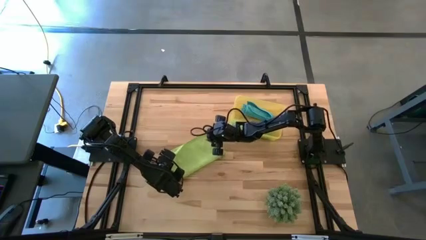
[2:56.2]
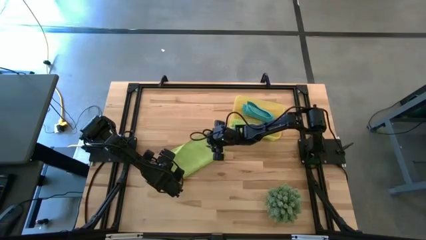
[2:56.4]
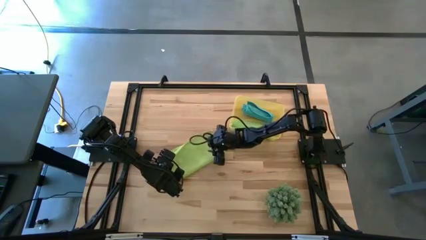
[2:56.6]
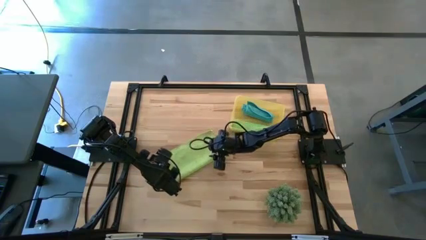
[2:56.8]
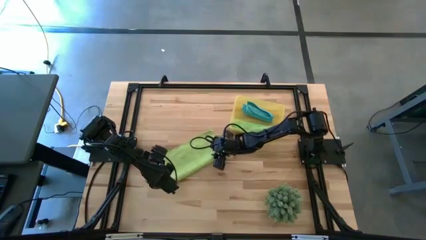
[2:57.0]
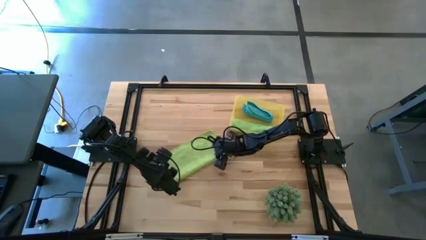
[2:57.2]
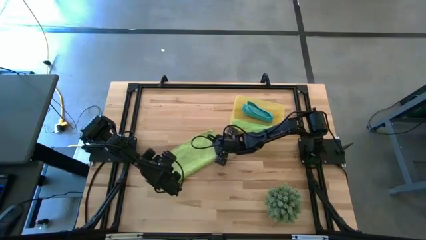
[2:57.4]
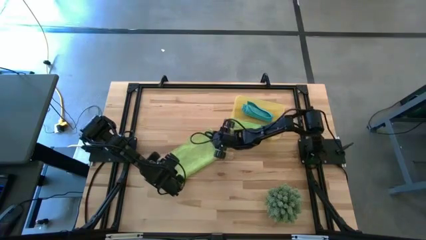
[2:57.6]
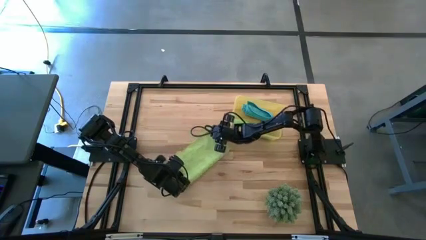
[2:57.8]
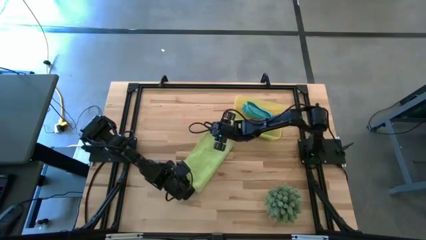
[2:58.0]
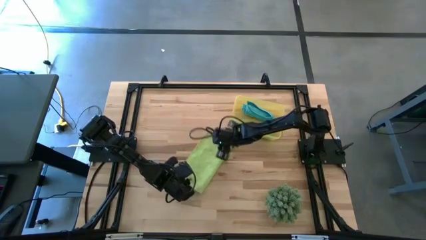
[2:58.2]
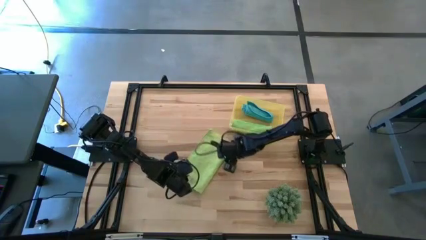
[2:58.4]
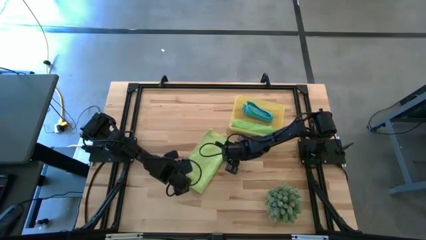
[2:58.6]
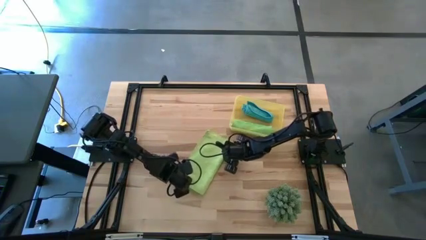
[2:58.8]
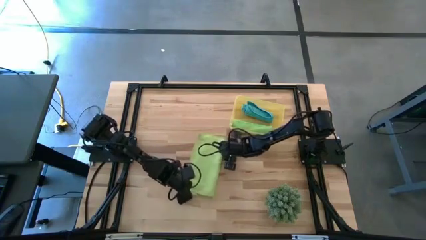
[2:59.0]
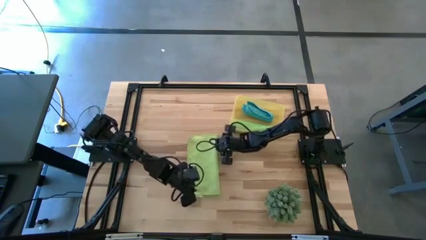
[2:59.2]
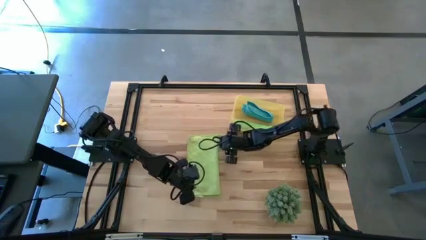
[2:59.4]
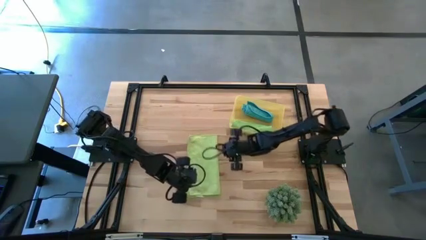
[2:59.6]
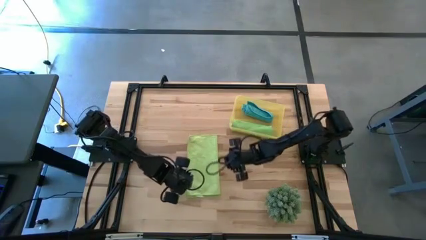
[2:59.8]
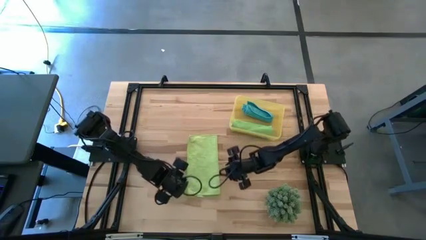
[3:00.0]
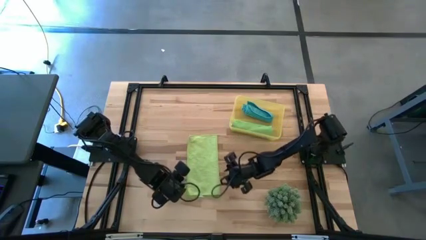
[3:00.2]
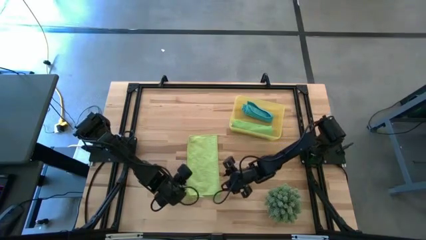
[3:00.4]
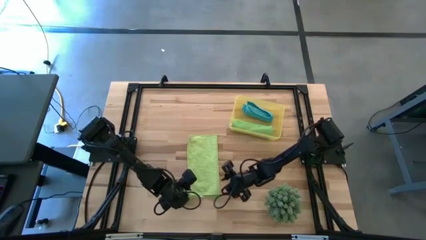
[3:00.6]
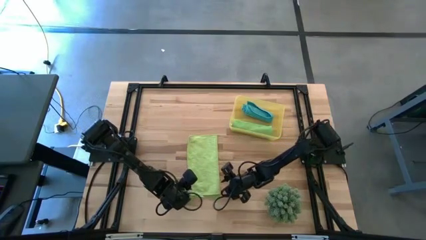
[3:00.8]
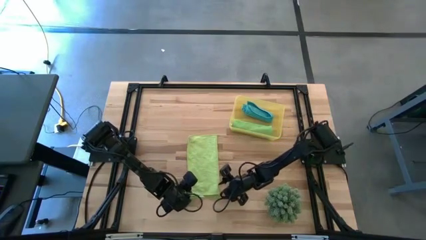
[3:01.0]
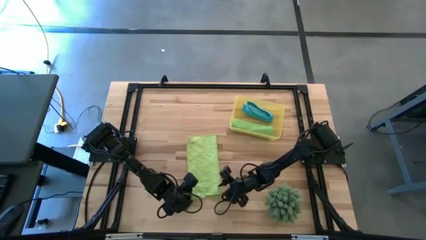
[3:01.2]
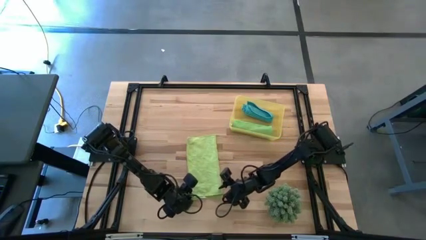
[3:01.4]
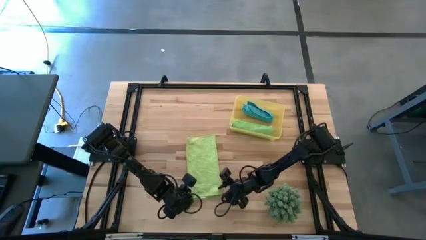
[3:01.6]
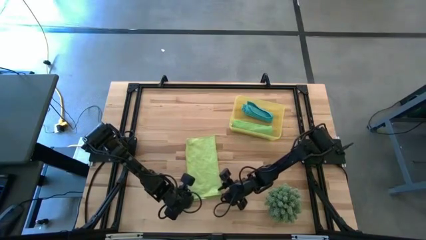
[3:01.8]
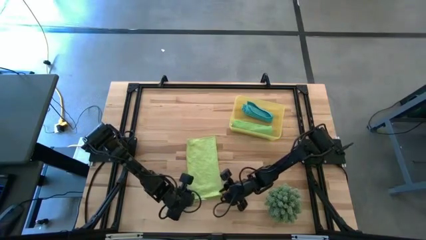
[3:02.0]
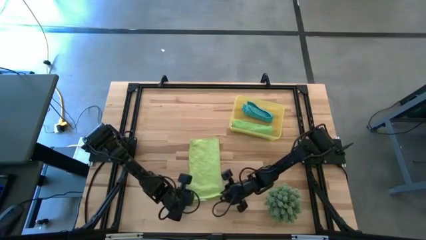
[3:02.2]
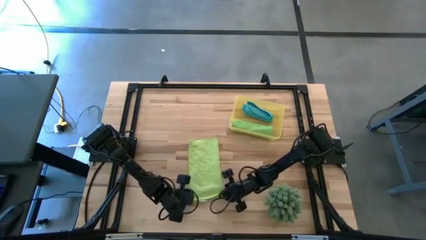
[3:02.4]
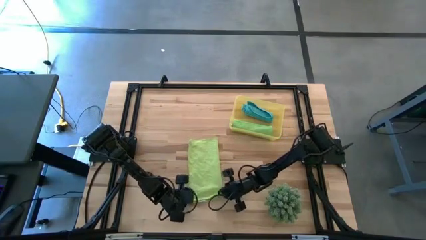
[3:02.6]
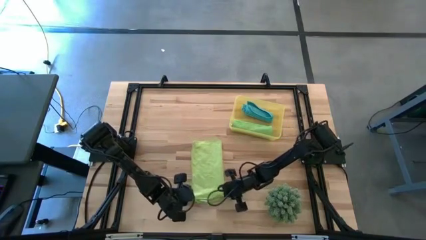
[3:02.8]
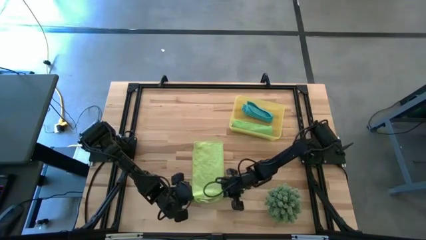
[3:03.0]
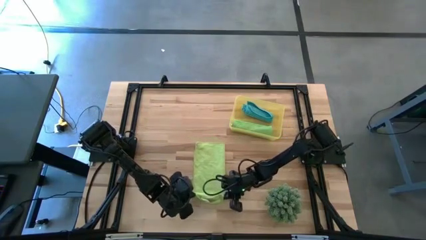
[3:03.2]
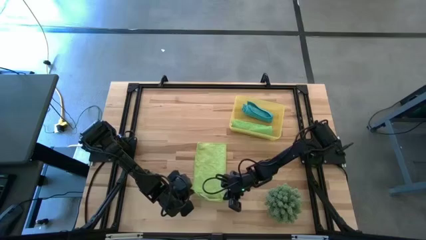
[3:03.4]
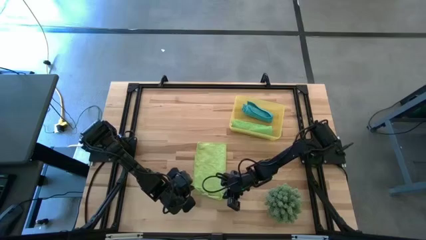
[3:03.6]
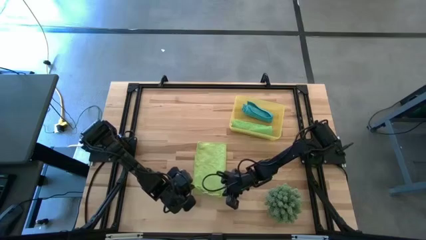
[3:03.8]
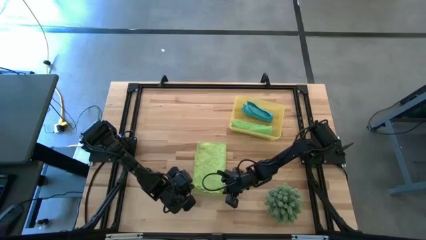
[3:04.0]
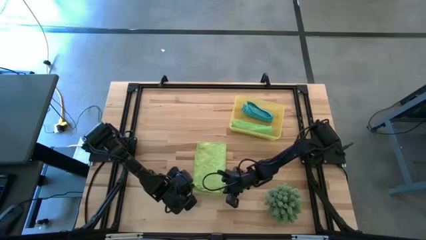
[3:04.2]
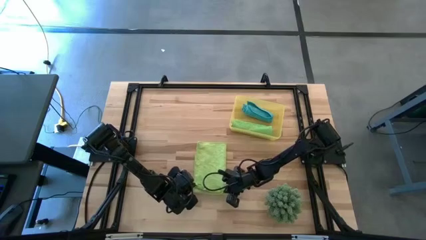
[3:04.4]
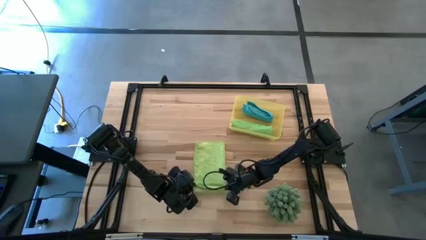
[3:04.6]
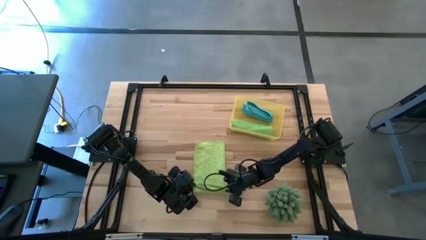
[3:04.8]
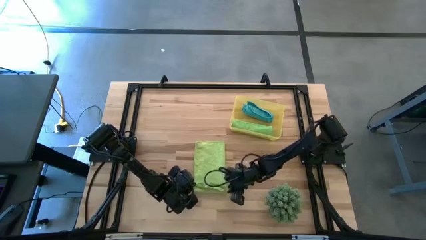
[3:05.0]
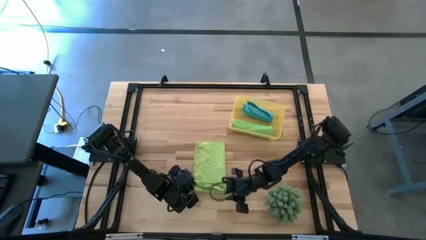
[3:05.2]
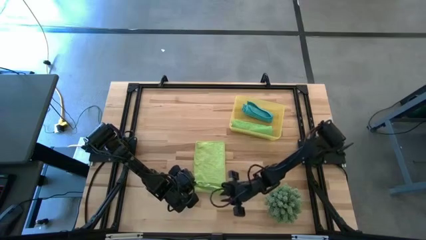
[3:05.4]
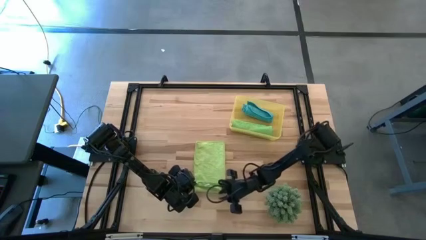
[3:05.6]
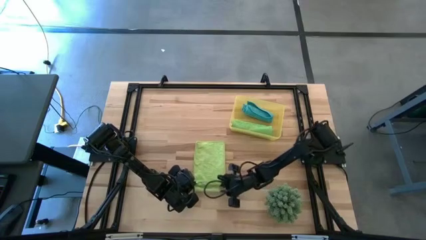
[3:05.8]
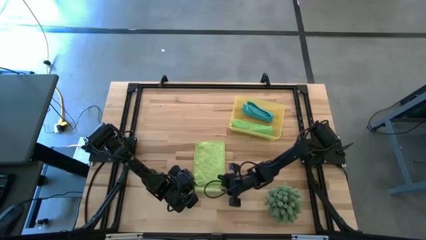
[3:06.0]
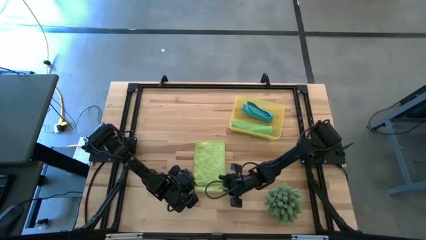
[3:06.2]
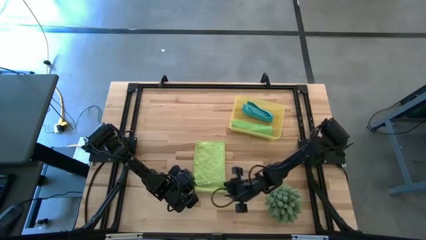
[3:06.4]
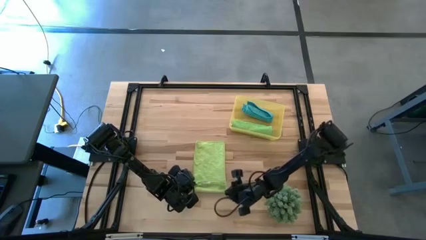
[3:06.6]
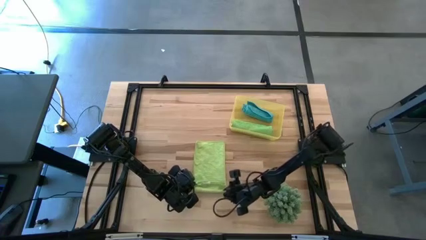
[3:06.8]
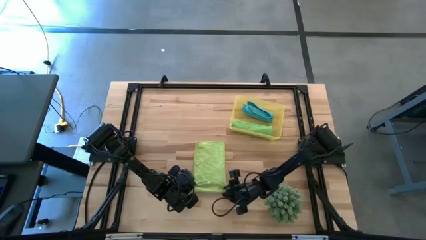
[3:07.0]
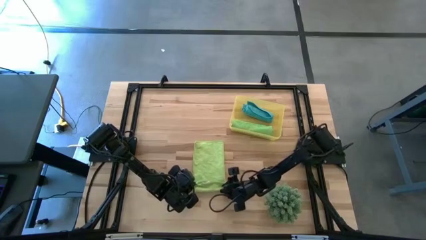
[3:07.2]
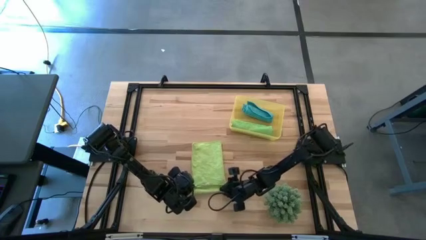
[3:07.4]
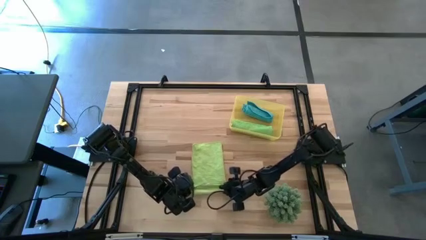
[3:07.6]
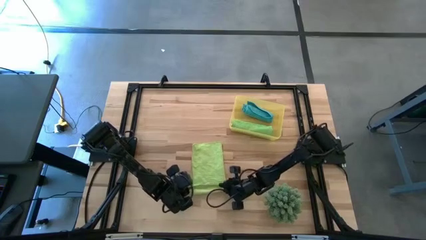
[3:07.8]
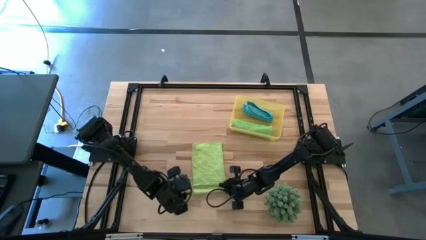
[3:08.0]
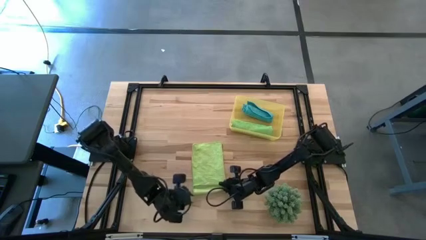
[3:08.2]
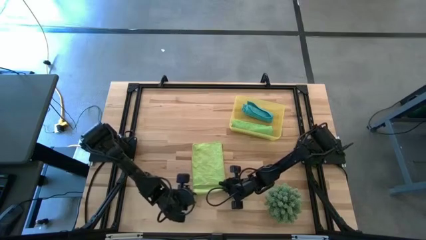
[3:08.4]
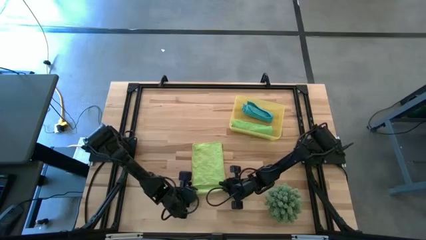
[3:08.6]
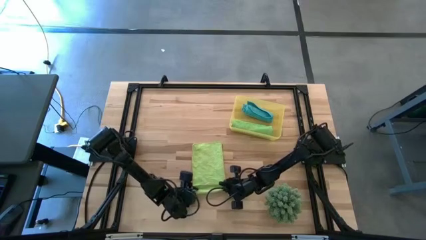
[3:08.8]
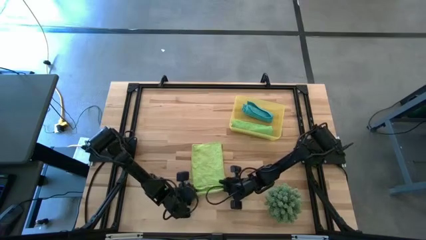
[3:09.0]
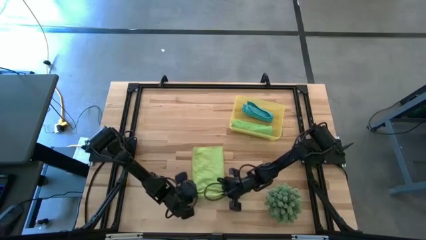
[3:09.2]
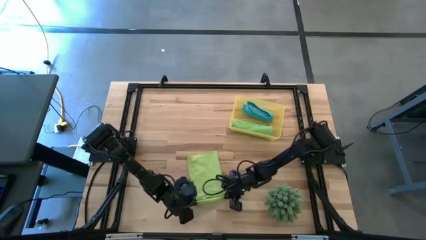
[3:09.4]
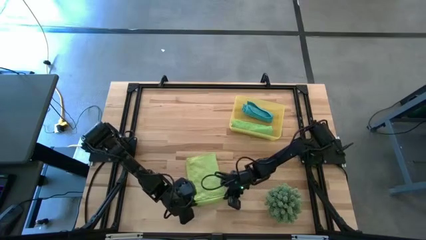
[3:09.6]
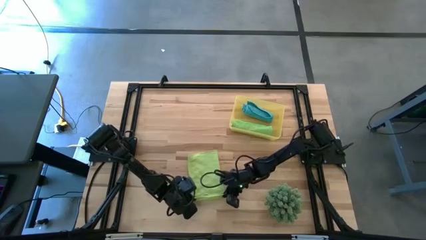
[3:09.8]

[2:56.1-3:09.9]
Task: Roll microfiber towels into tight, uniform cylinder then place into a basket
Roll the green microfiber towel

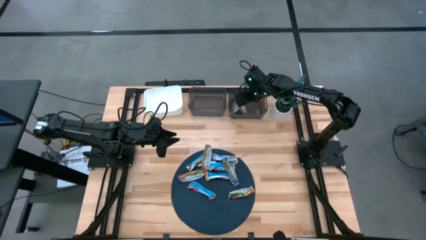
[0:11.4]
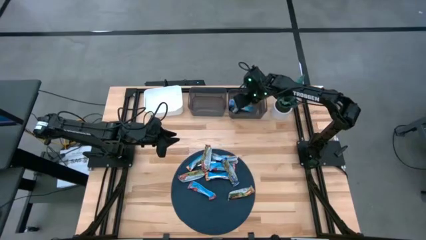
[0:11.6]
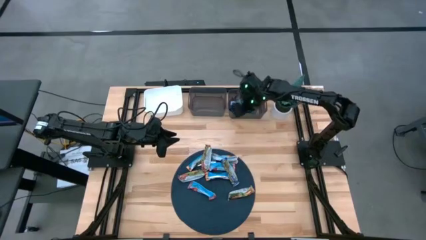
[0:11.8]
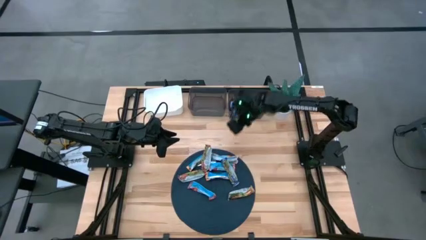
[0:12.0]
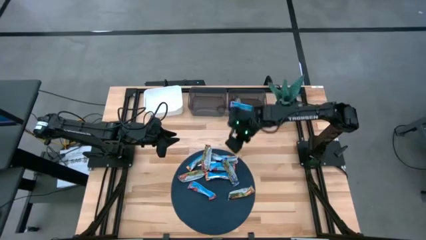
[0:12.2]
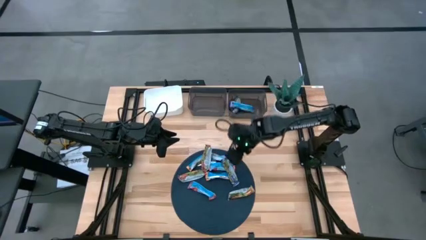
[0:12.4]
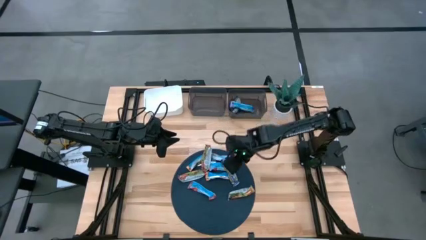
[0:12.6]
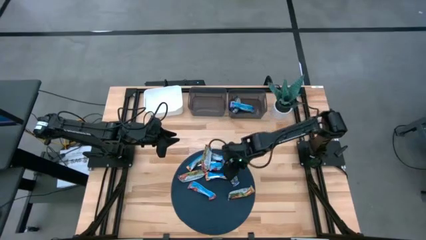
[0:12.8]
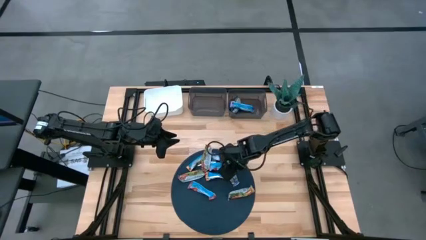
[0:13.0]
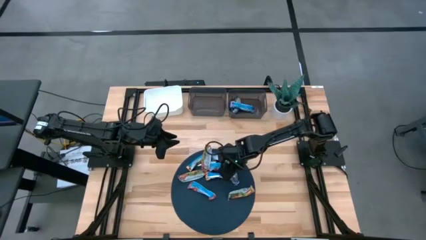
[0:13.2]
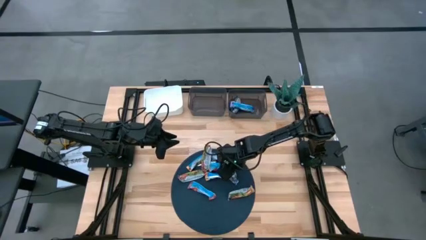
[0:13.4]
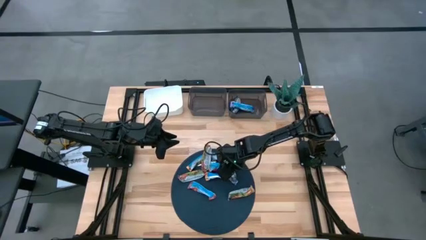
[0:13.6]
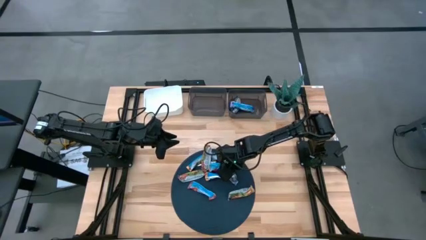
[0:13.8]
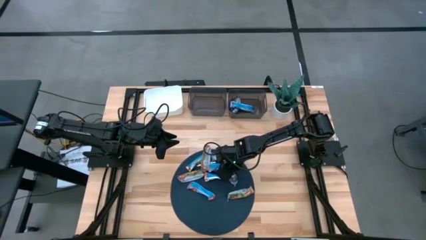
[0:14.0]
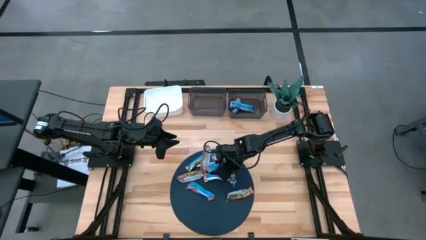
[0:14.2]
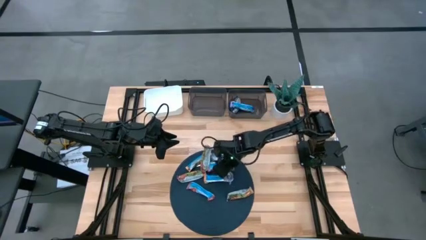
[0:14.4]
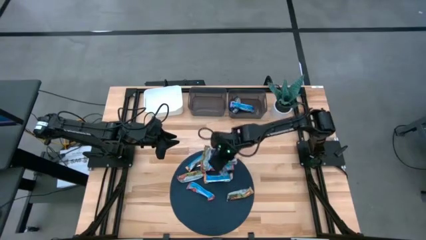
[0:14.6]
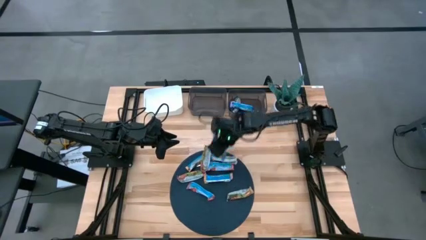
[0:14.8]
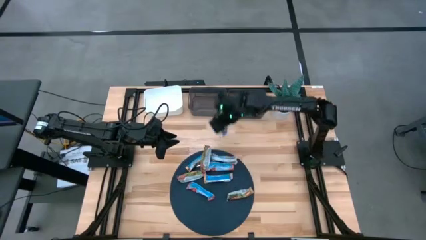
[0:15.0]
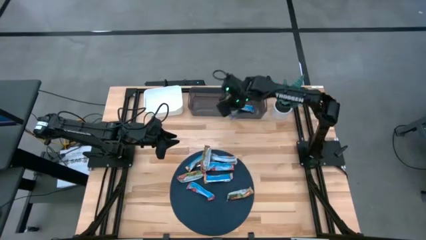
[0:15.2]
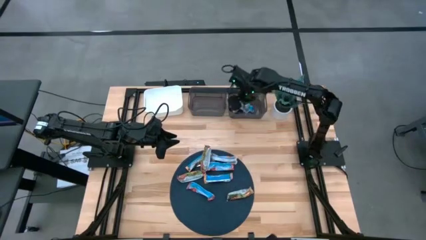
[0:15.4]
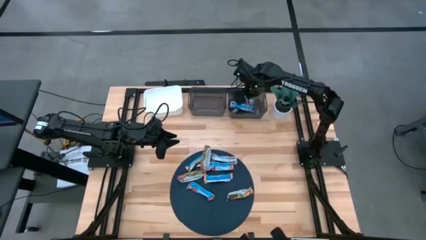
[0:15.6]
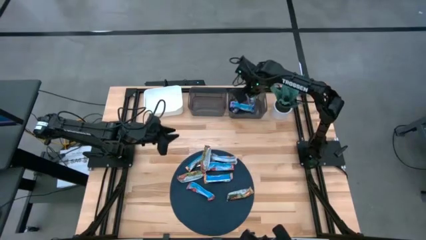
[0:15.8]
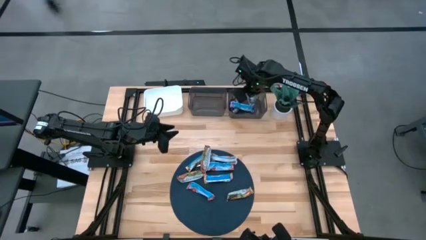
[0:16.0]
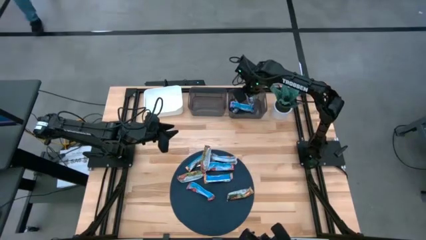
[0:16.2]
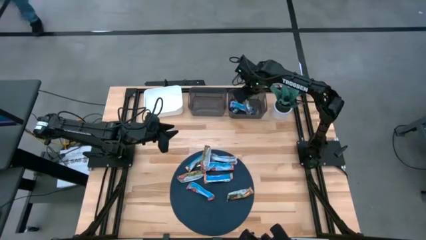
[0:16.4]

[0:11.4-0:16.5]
Task: Pick and place Granola Bars by type
Put the blue granola bar into the right black transparent bin
